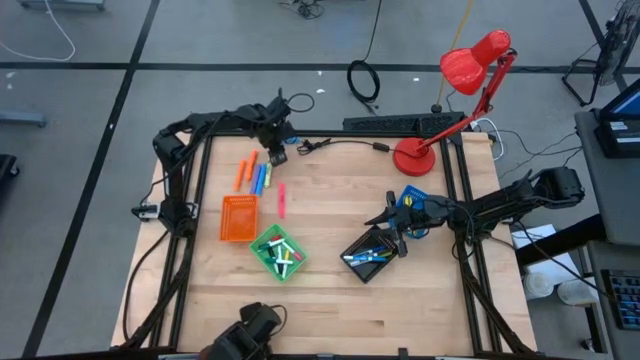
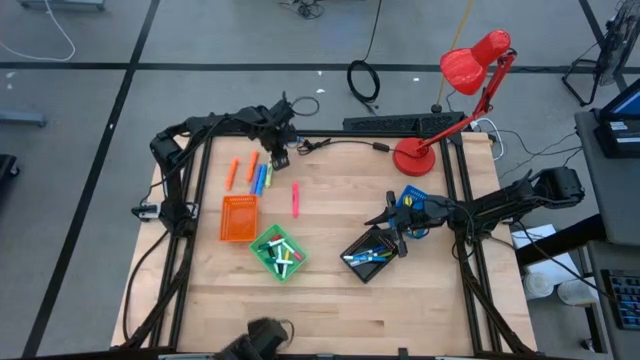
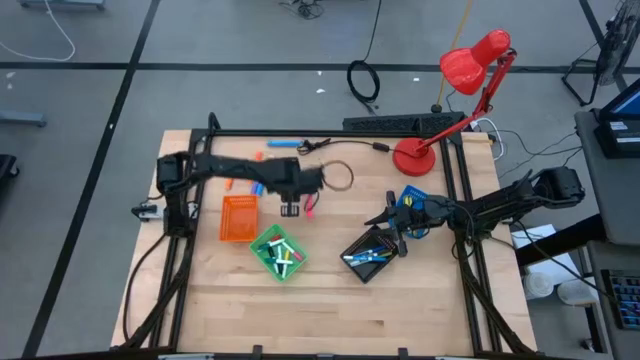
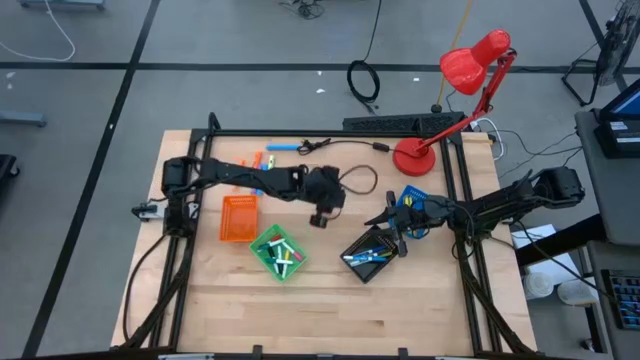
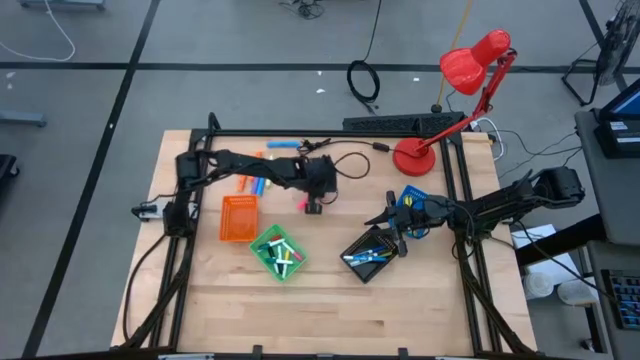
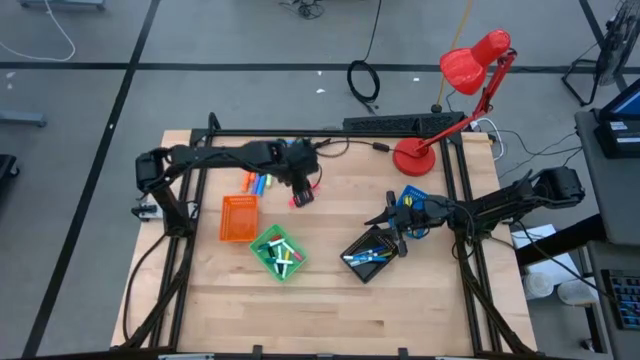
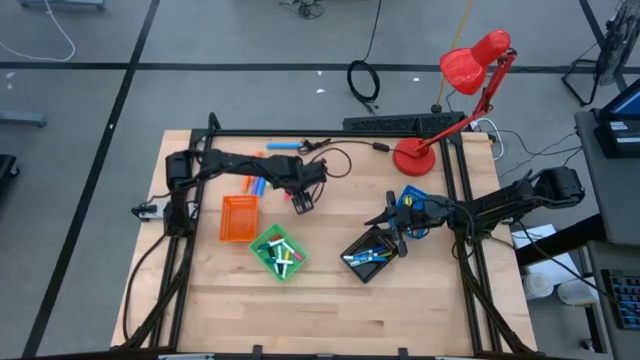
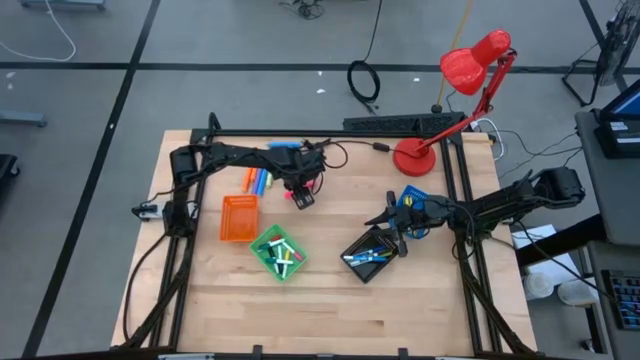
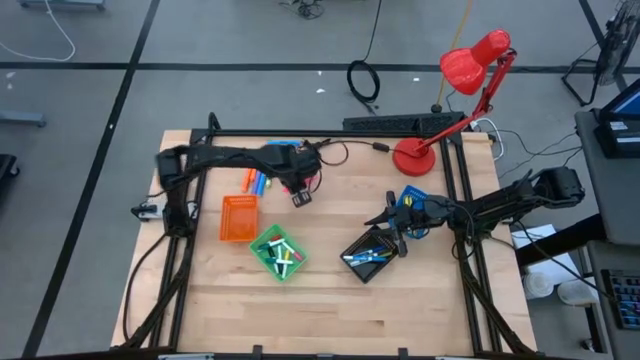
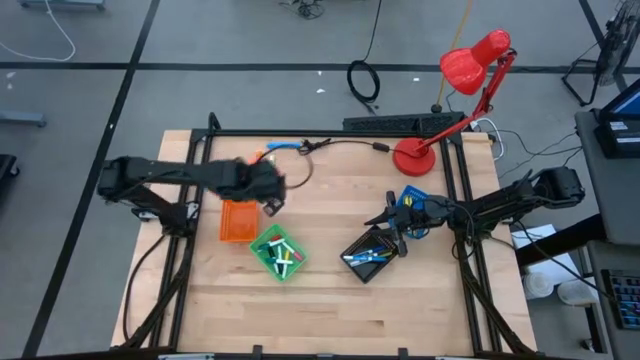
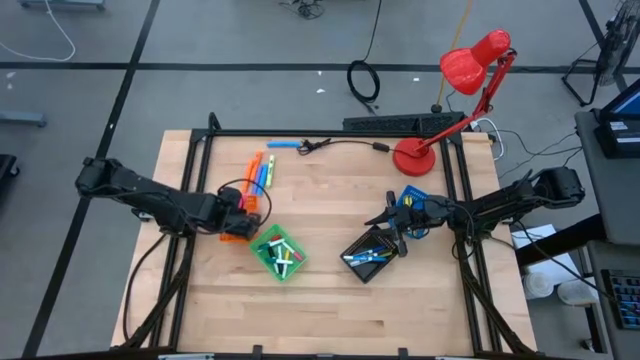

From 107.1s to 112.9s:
Task: Pick & Place Markers
Put the large pink highlighter pen into the orange basket

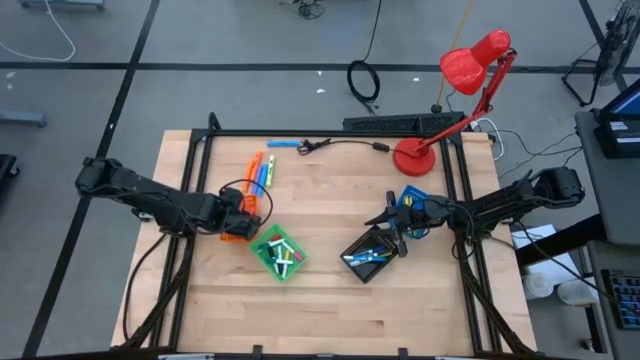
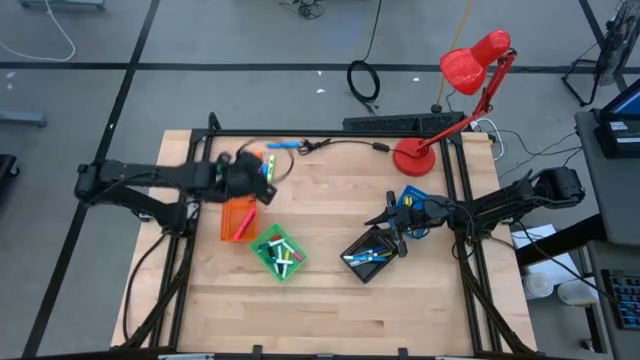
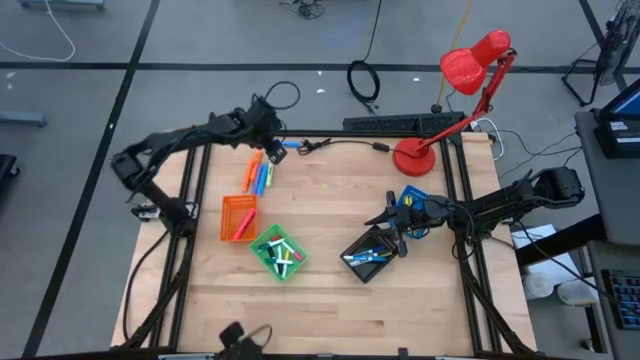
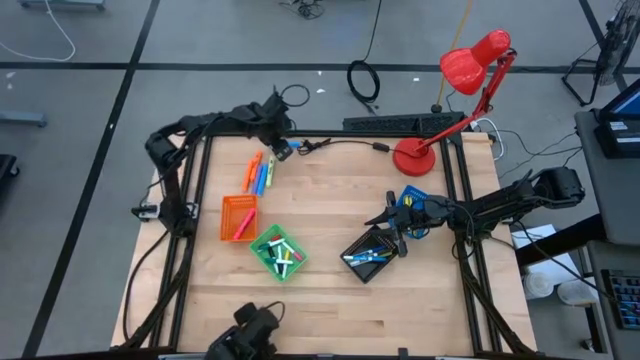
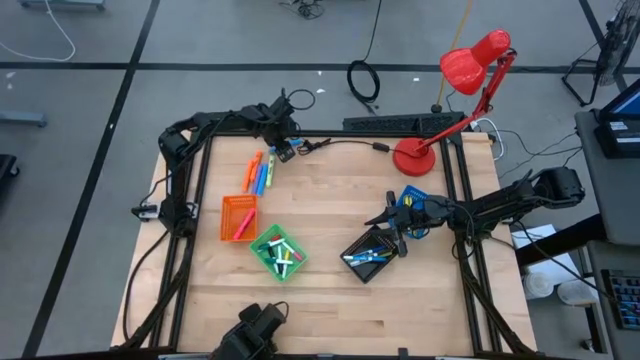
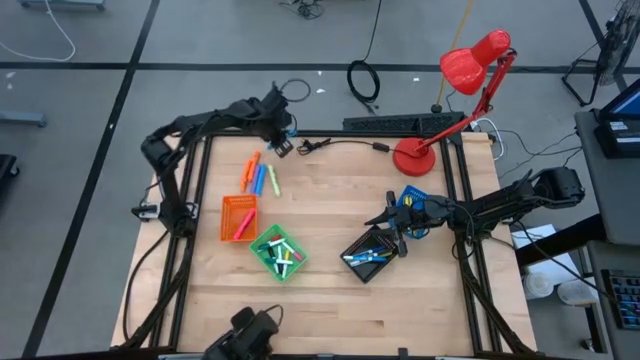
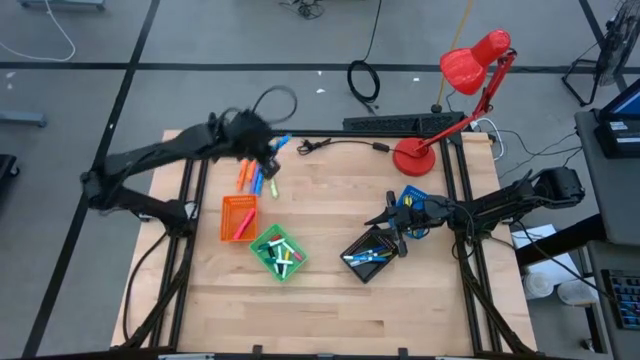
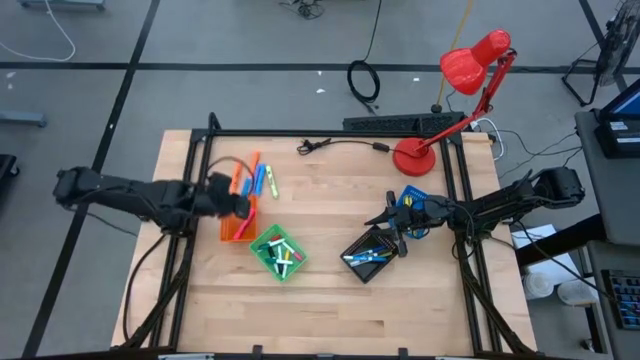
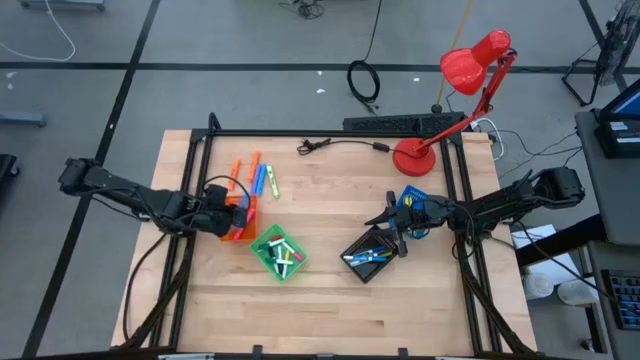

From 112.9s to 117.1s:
Put the top large blue highlighter pen into the orange basket

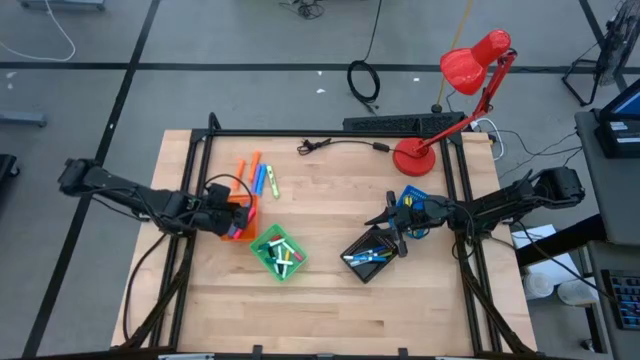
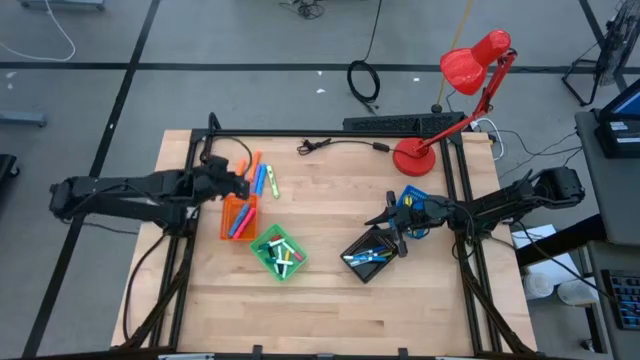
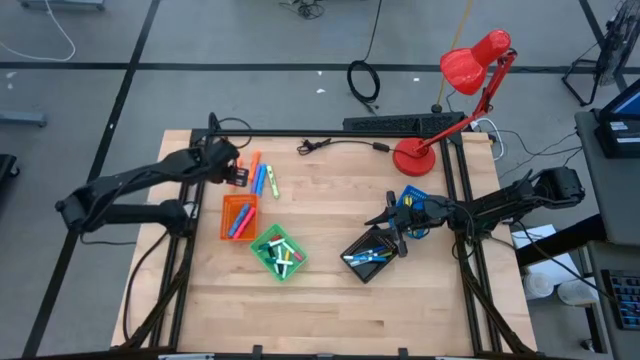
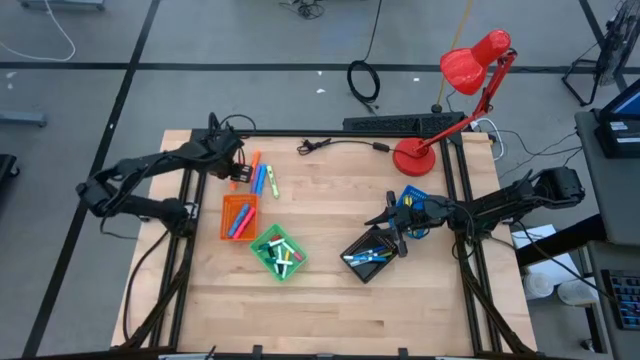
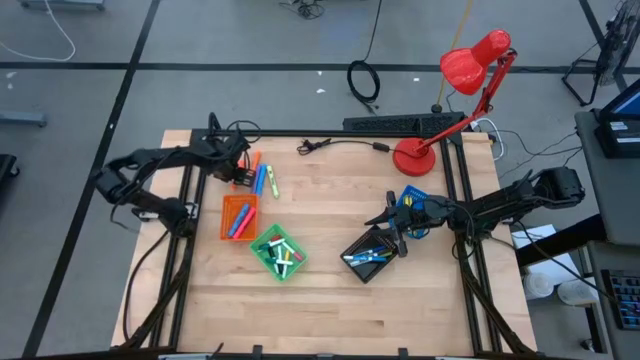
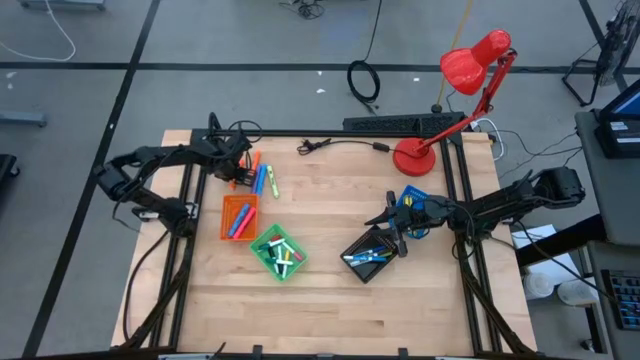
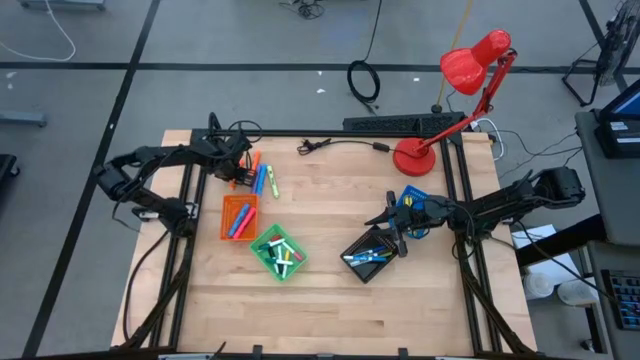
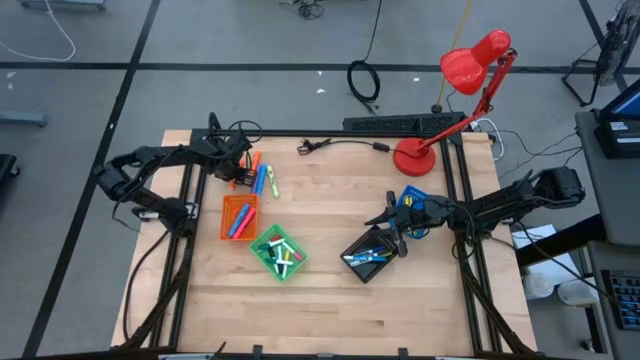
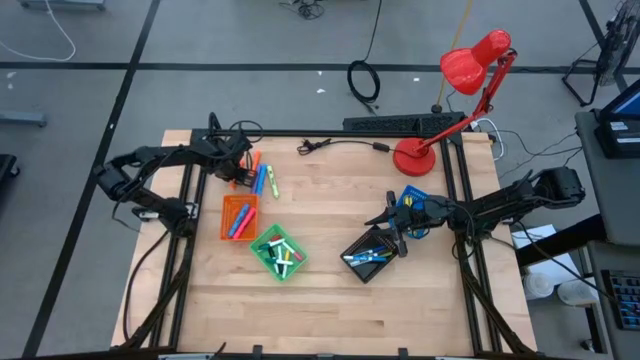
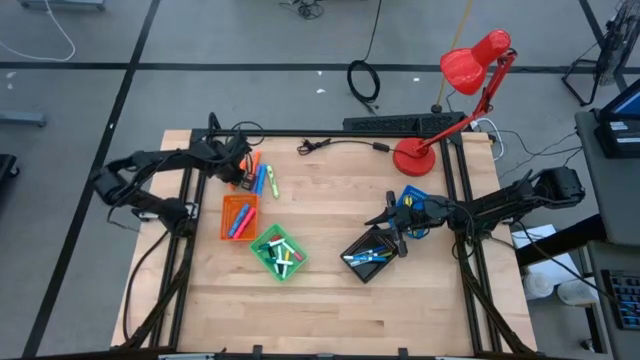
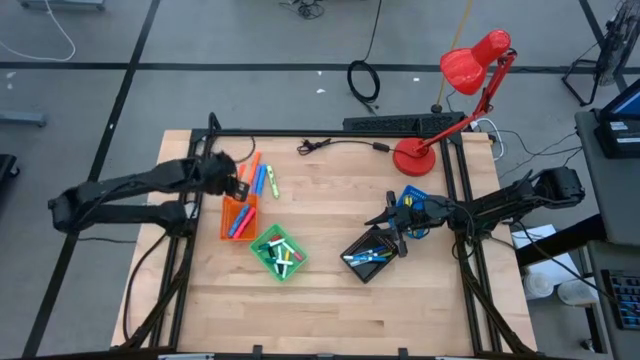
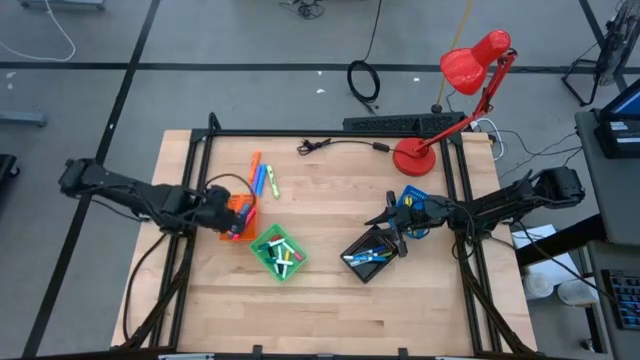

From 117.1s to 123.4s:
Put the left large orange highlighter pen into the orange basket

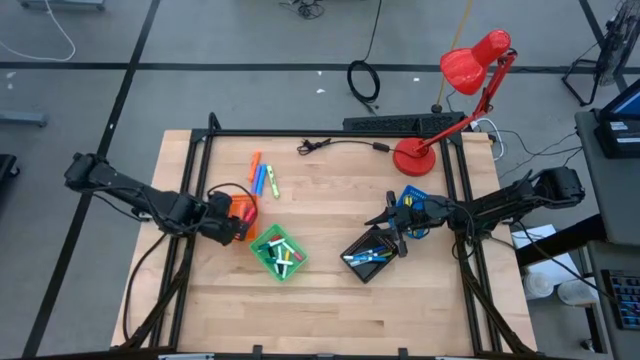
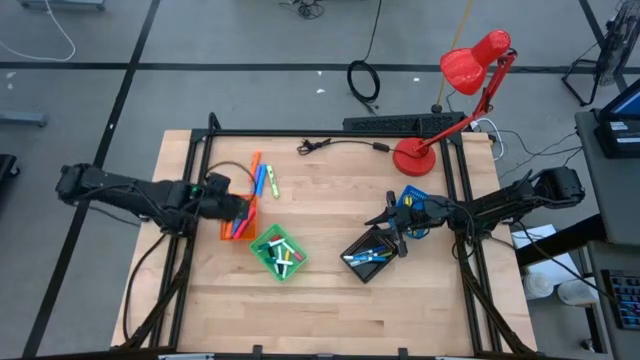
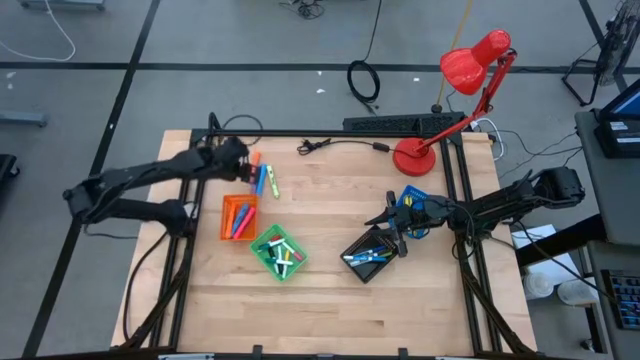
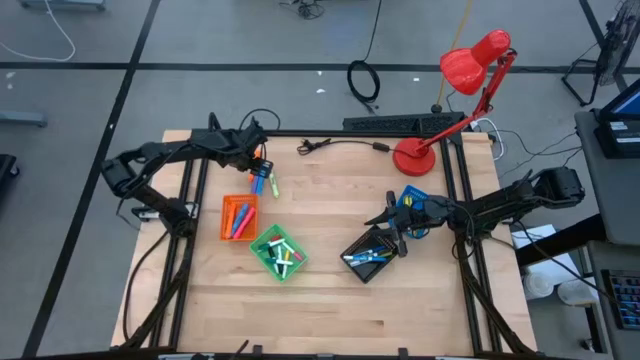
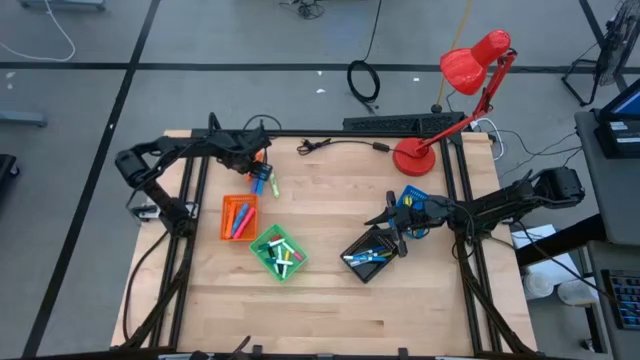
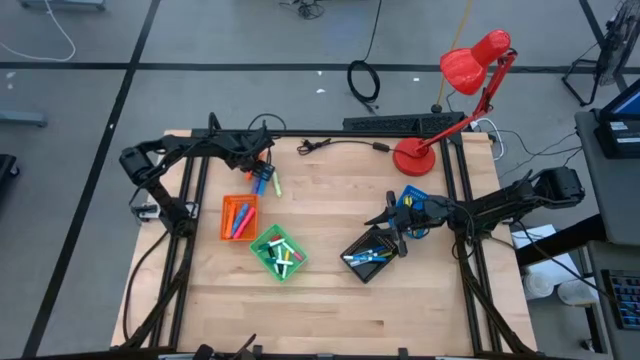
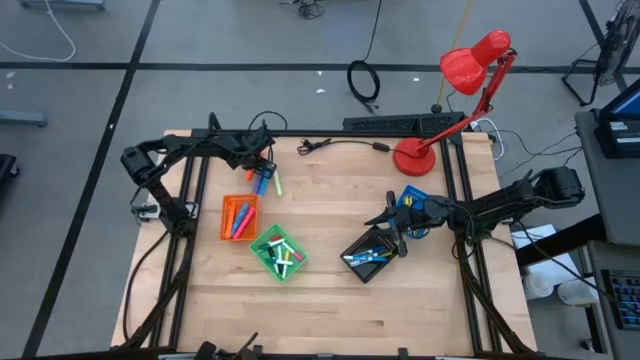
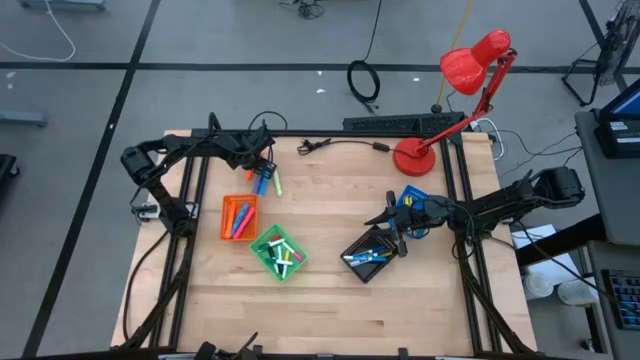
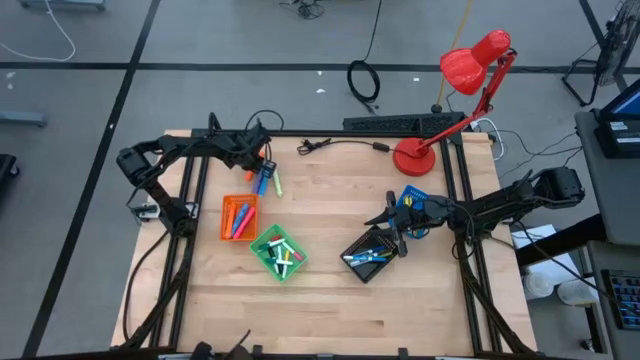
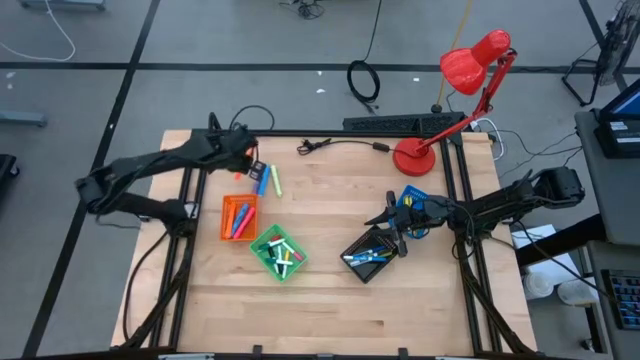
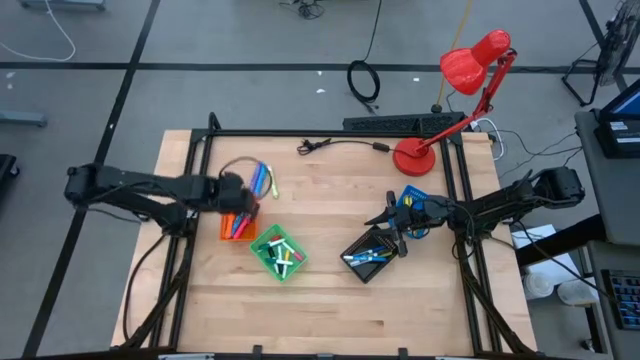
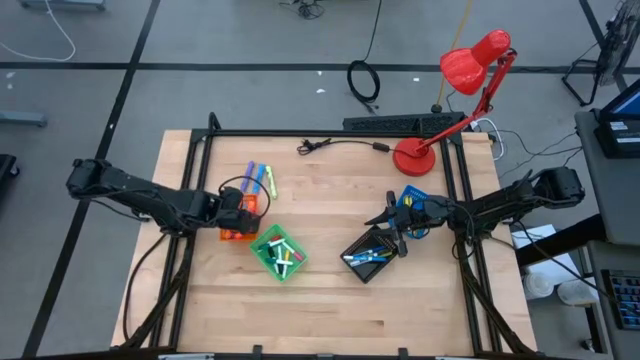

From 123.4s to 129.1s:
Put the large orange highlighter pen into the orange basket
